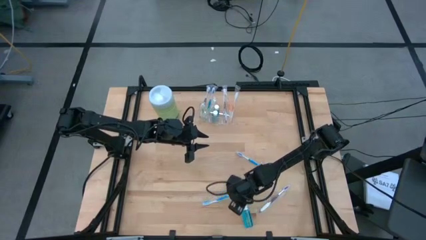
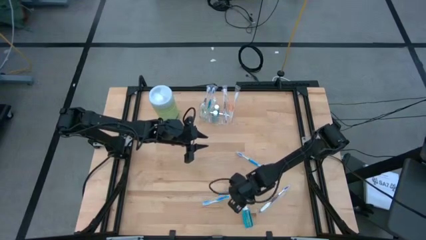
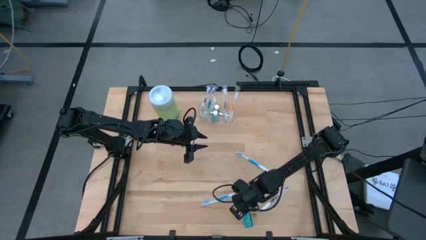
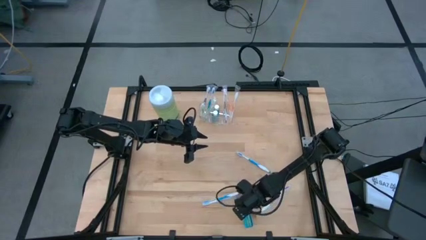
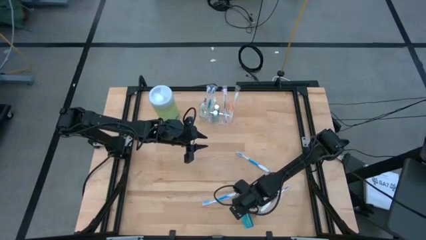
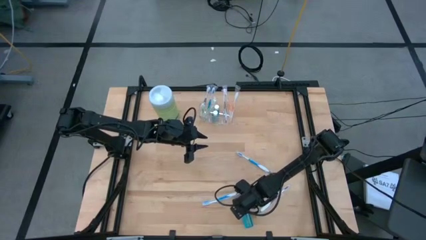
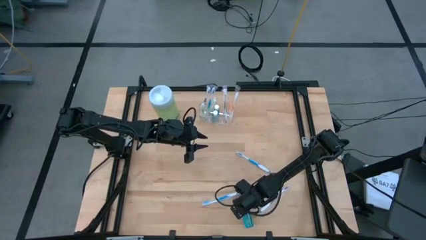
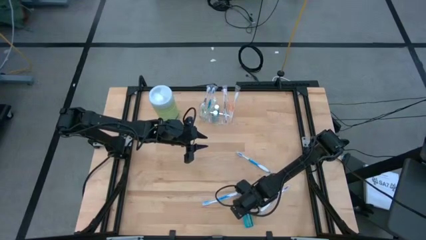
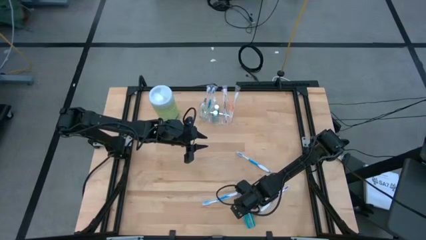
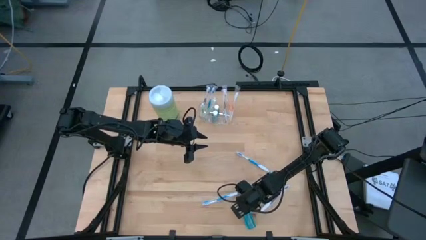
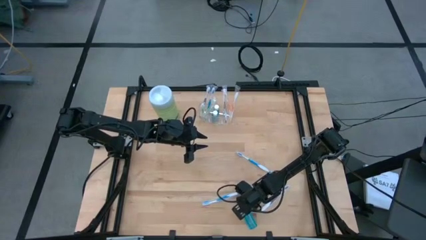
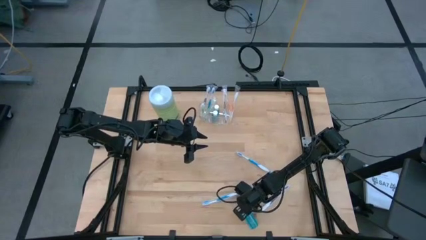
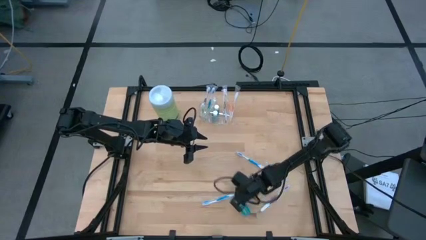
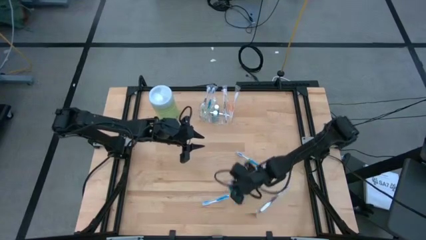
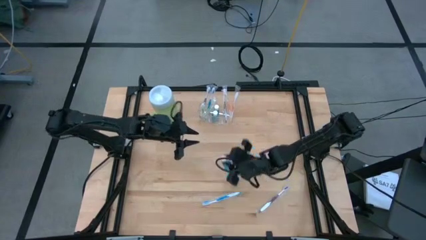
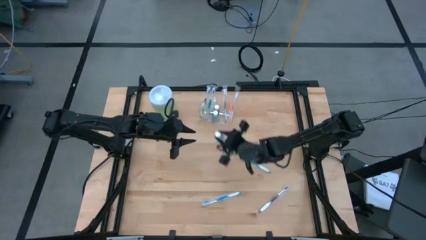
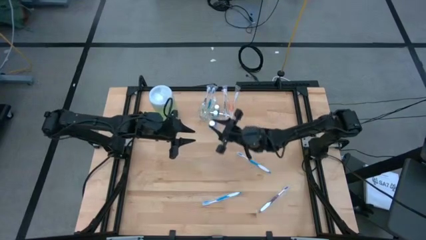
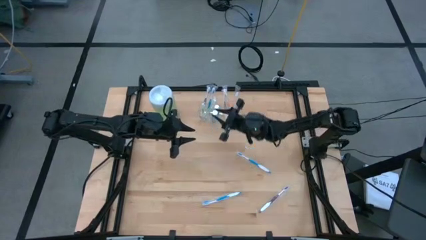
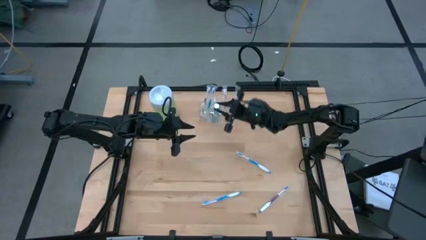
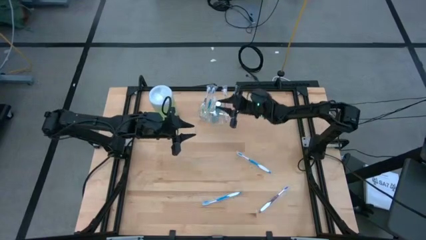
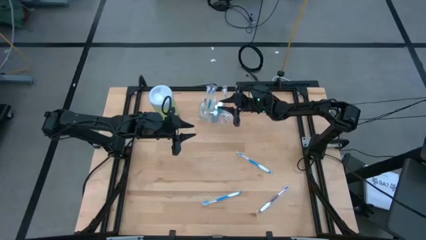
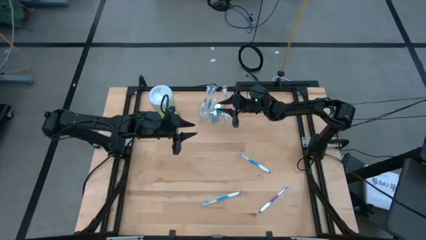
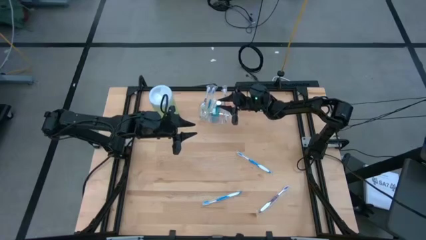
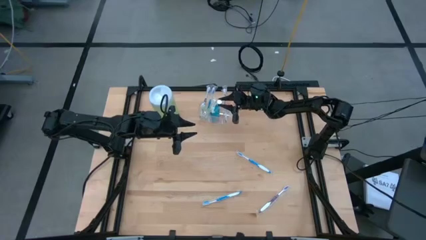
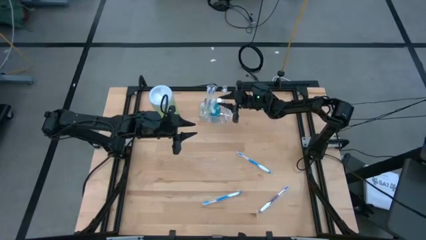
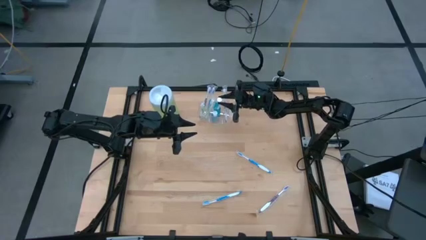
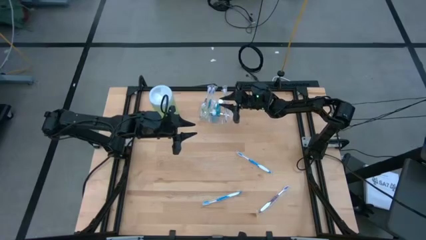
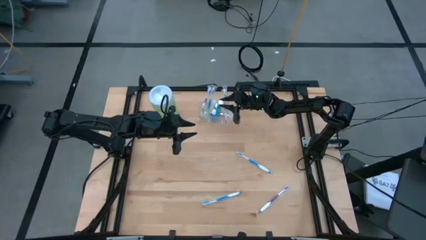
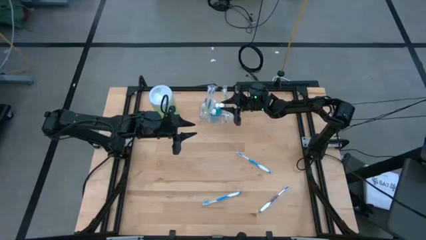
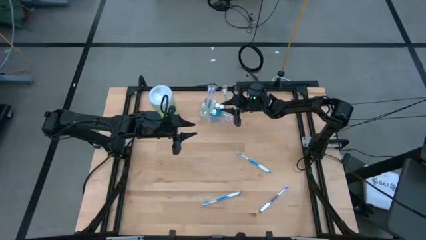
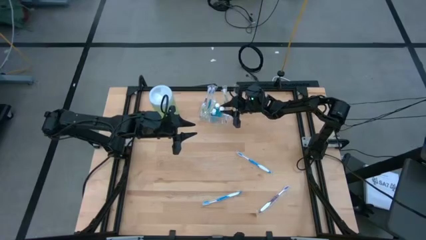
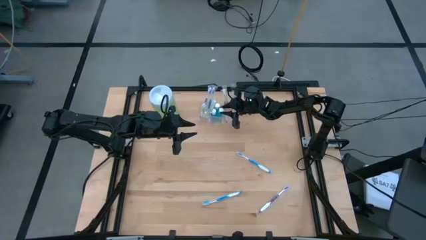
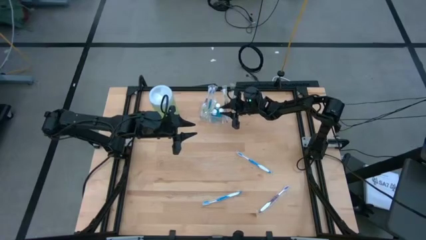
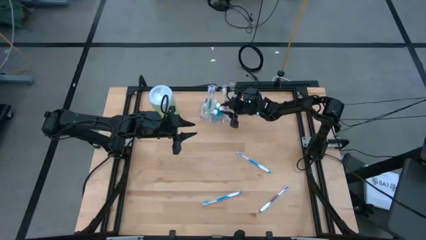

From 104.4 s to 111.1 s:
Task: Pick & Place toothbrushing station
Put the mouthwash into the transparent organizer

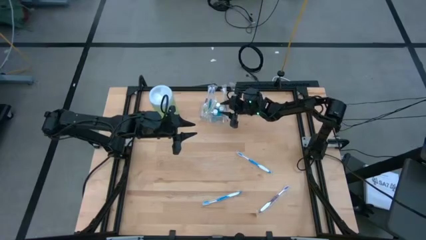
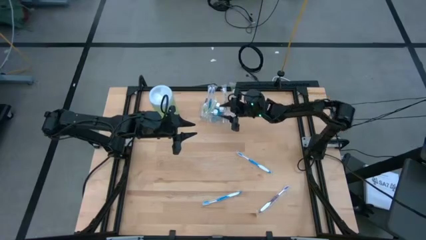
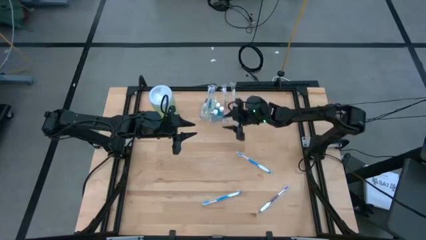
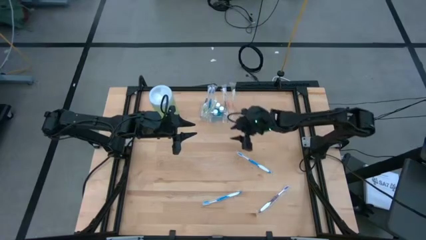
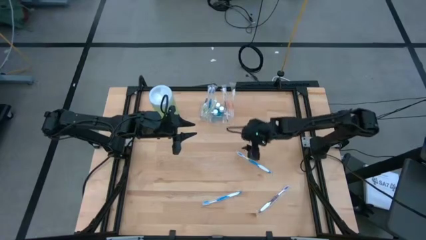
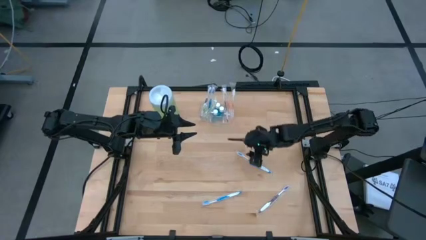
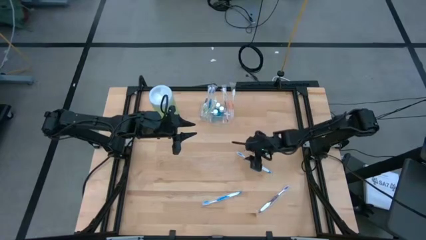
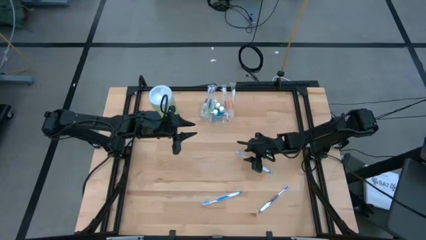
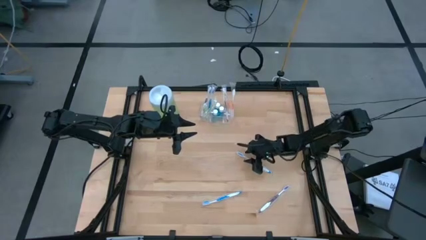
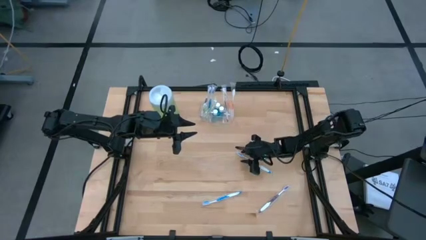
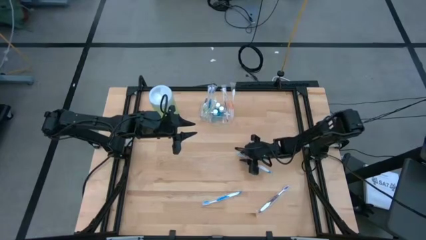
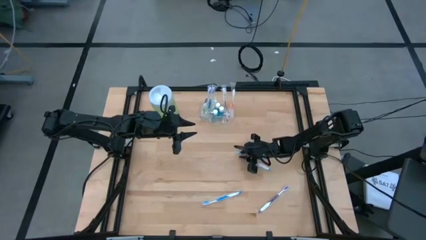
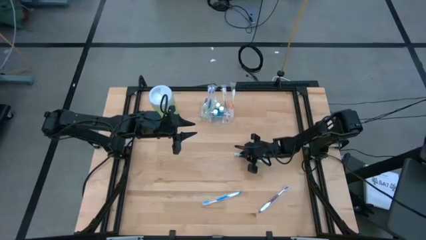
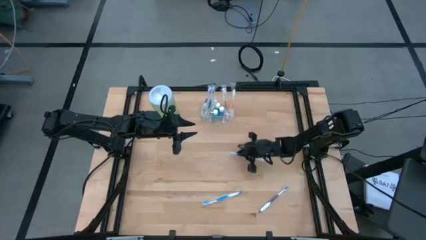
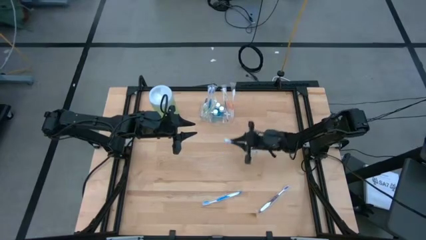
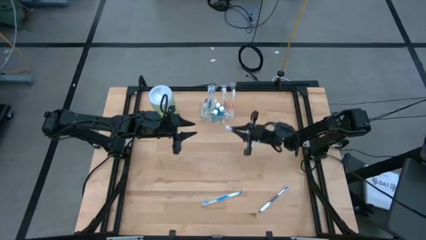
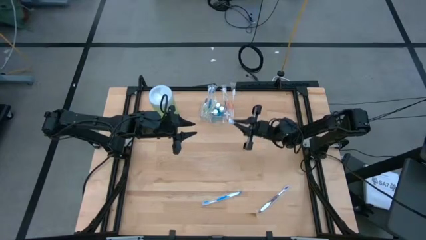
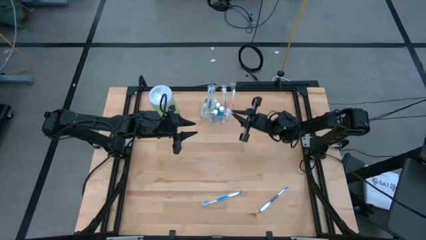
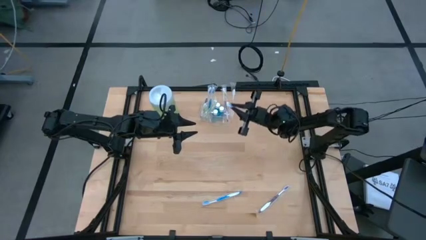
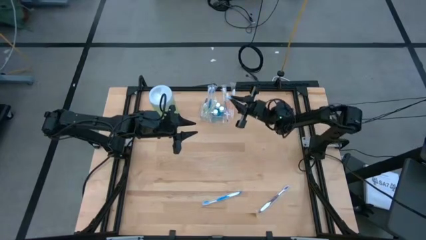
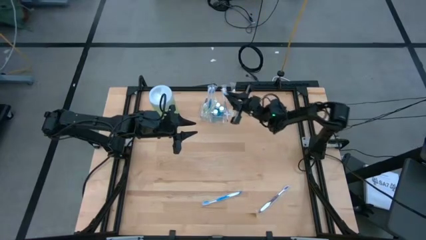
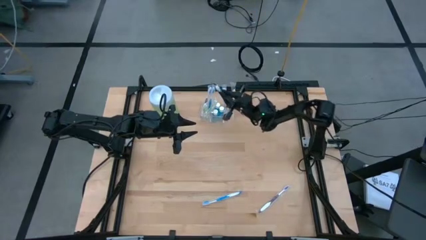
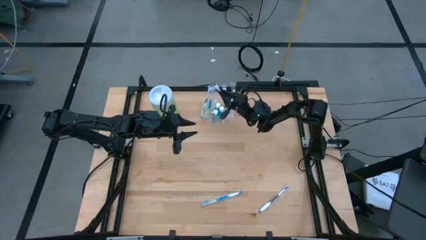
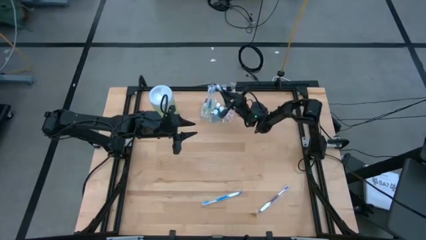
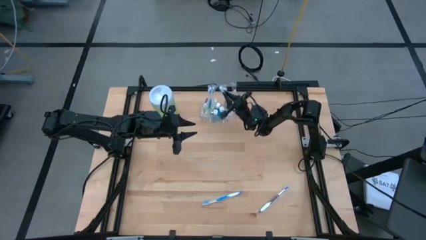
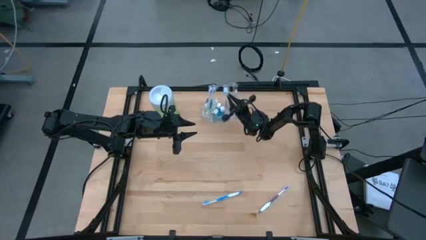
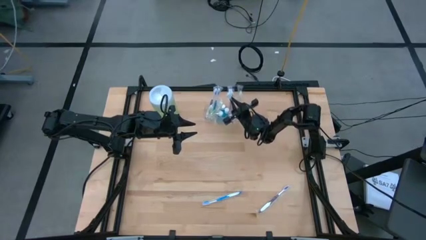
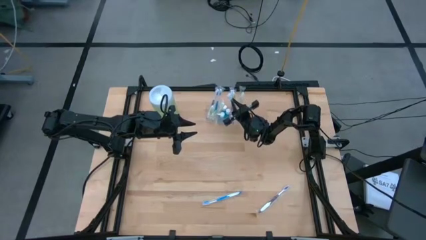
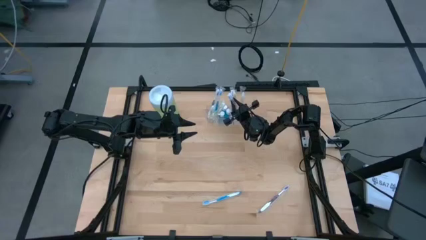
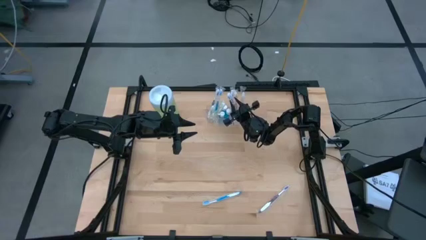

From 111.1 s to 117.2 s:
Put the top blue toothbrush into the transparent organizer

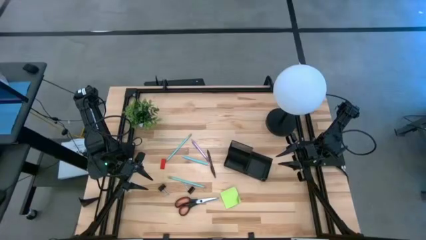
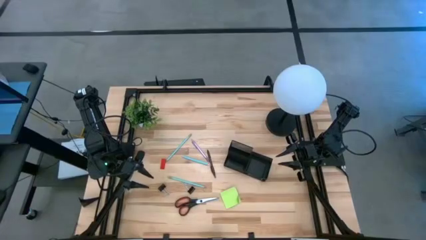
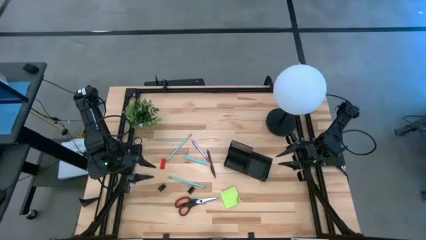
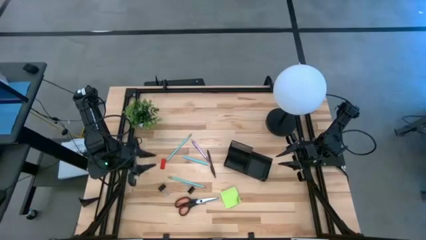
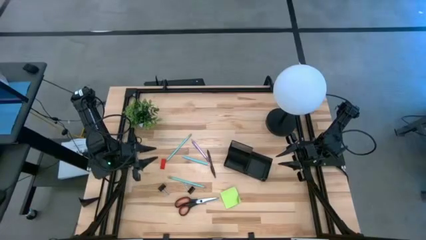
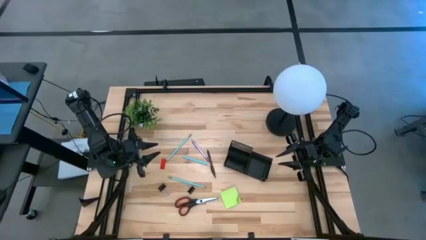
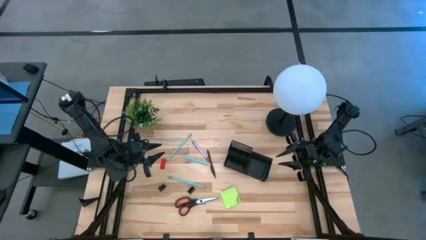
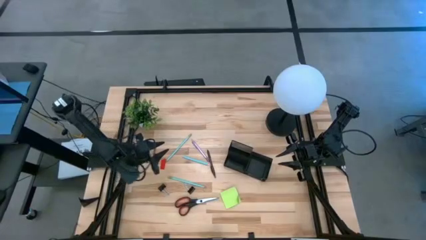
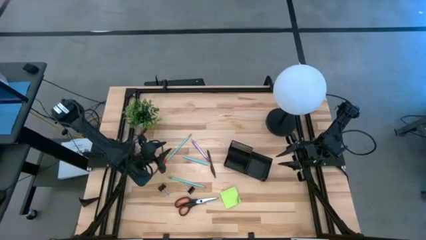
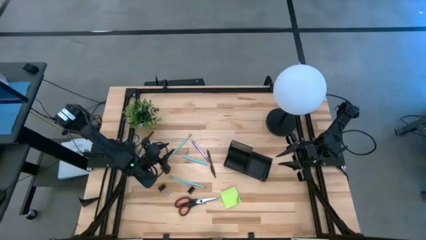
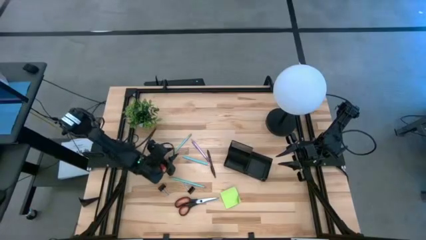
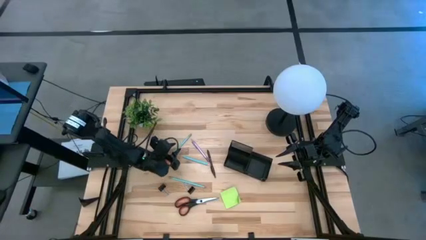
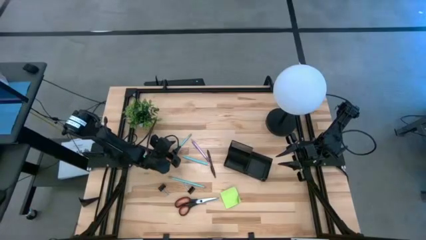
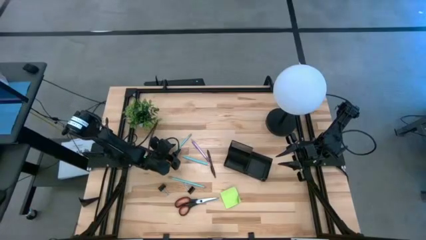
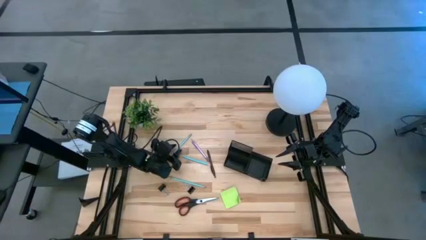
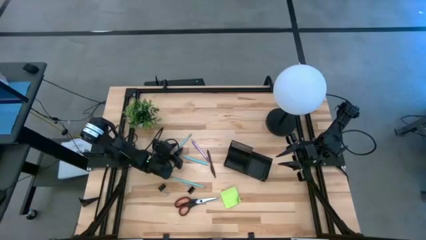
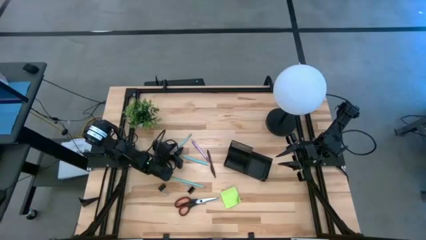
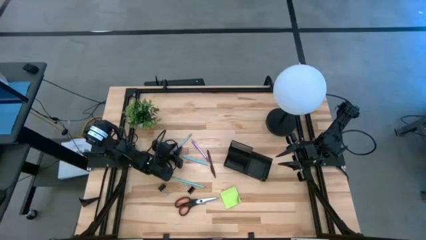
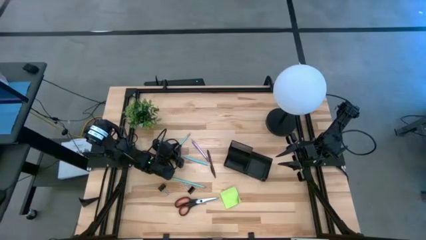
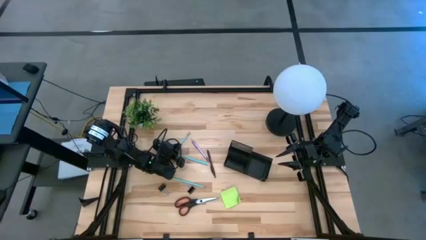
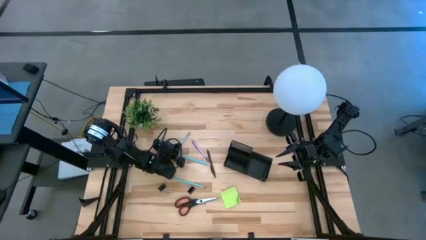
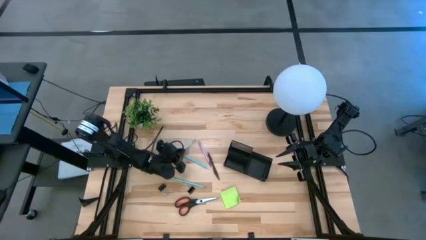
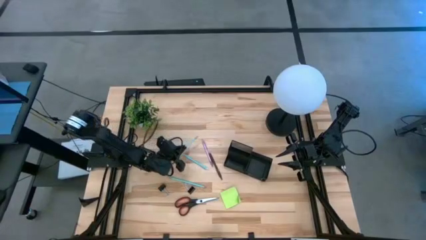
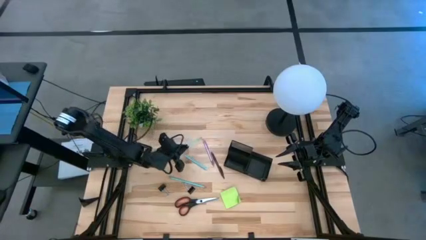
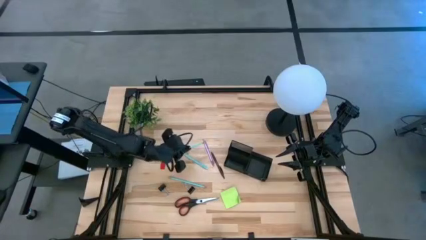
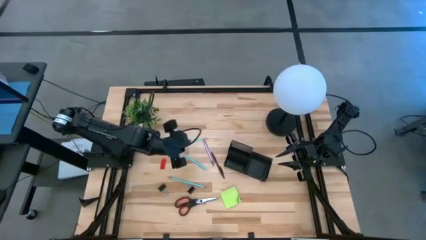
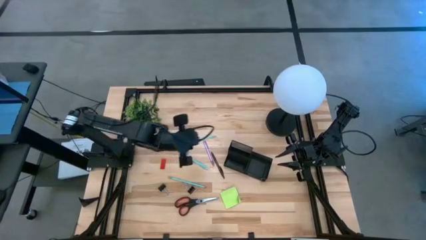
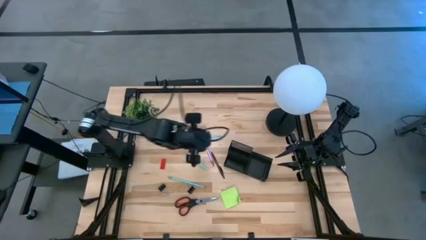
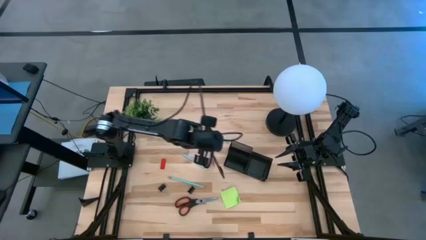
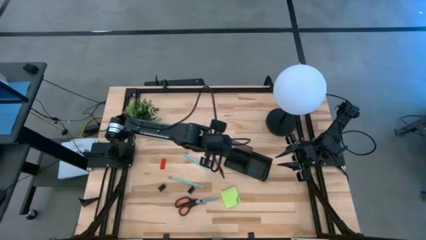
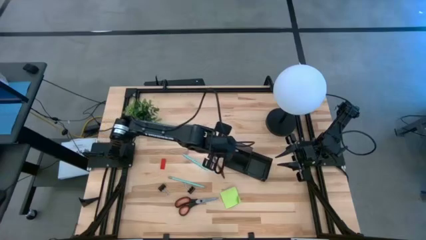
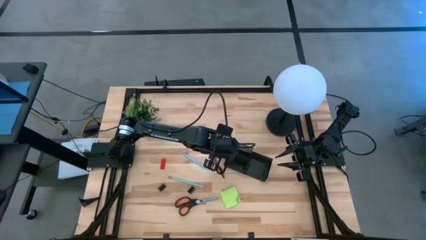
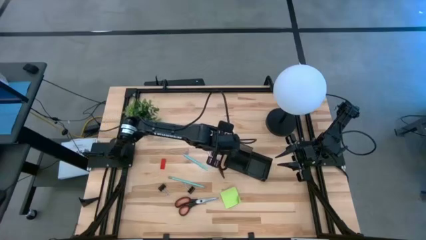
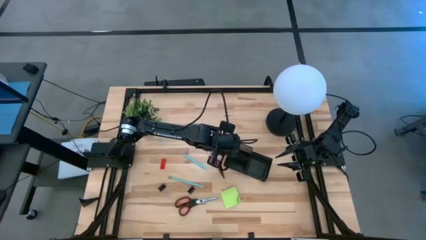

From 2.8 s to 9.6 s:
Task: Pick and place office supplies into organizer
Put the top blue pencil into the desk organizer
